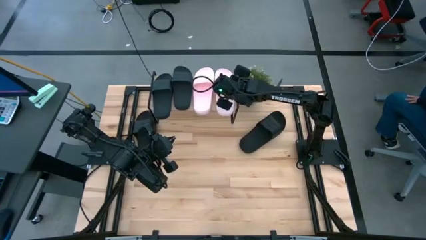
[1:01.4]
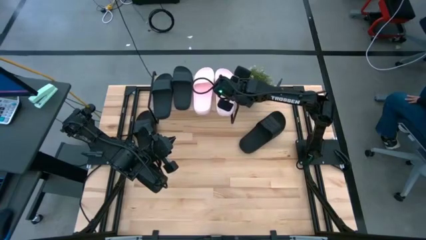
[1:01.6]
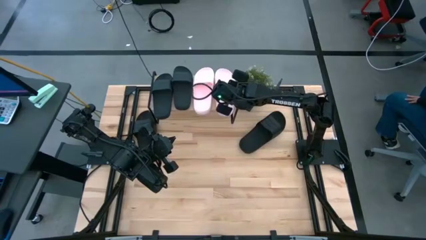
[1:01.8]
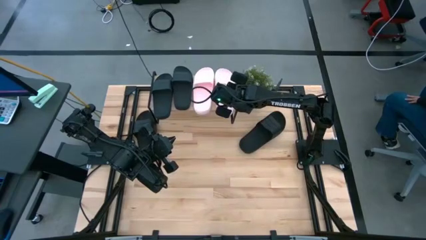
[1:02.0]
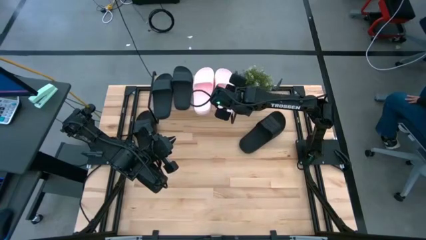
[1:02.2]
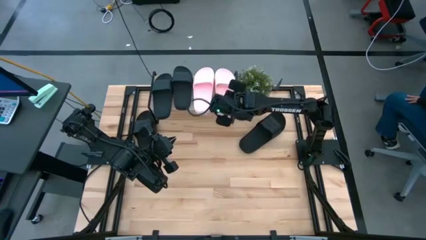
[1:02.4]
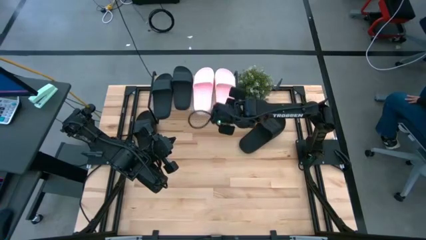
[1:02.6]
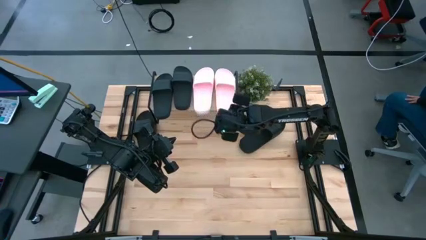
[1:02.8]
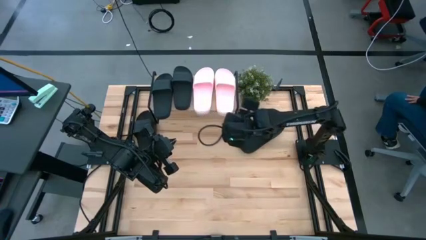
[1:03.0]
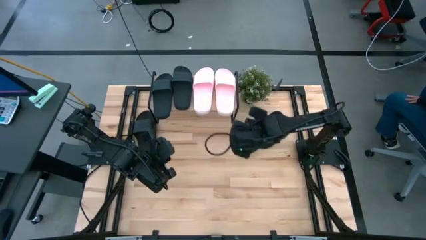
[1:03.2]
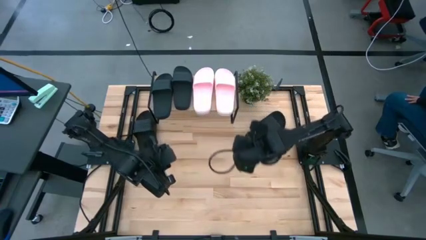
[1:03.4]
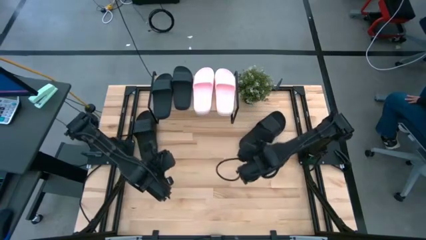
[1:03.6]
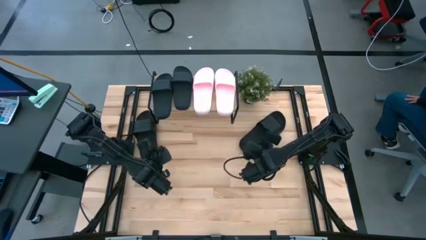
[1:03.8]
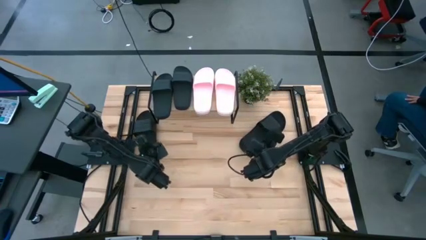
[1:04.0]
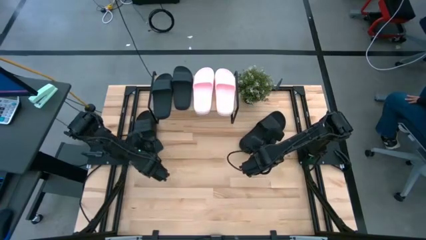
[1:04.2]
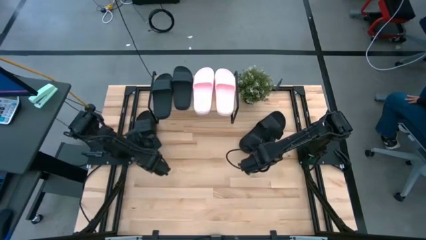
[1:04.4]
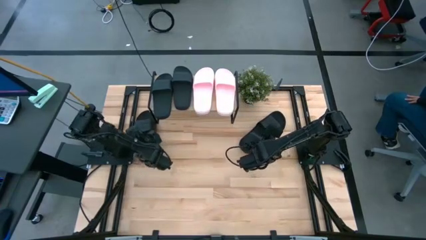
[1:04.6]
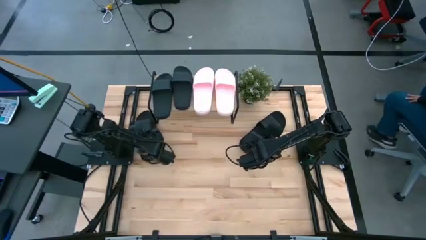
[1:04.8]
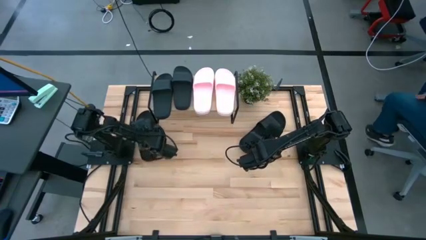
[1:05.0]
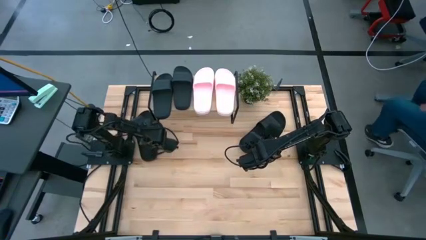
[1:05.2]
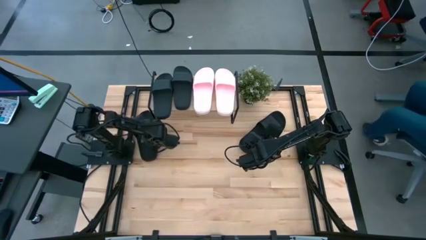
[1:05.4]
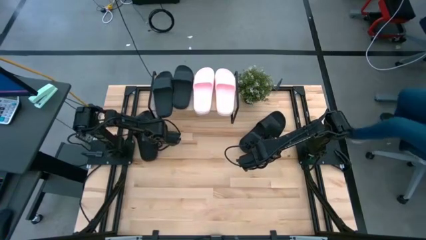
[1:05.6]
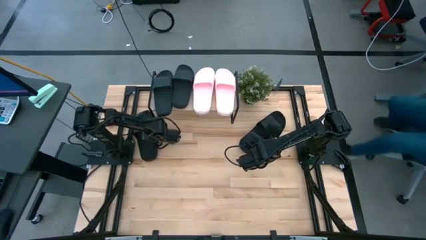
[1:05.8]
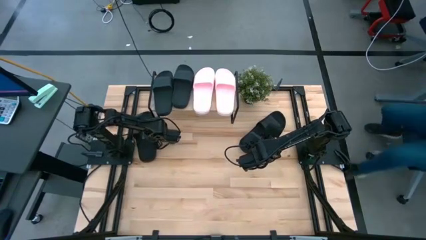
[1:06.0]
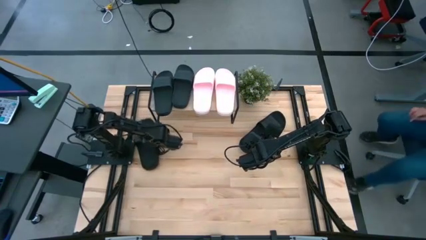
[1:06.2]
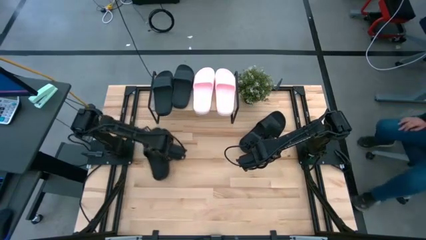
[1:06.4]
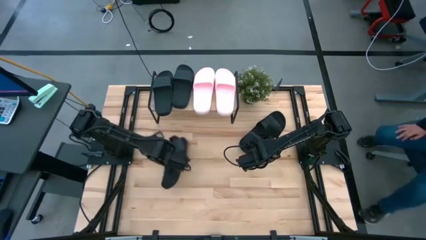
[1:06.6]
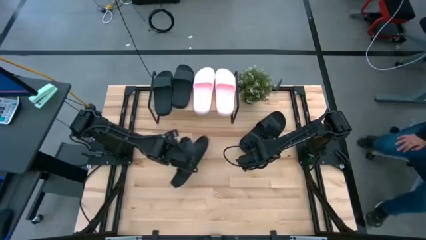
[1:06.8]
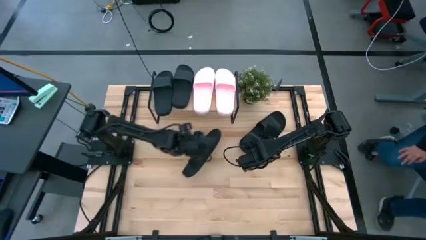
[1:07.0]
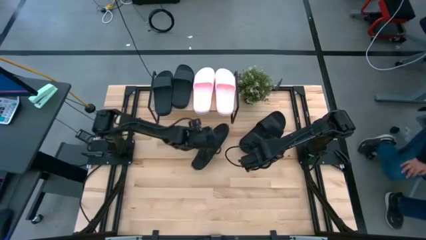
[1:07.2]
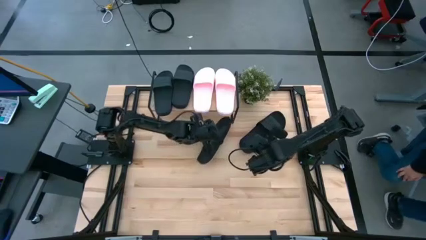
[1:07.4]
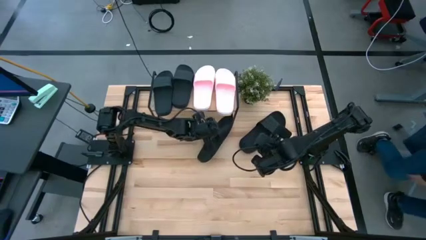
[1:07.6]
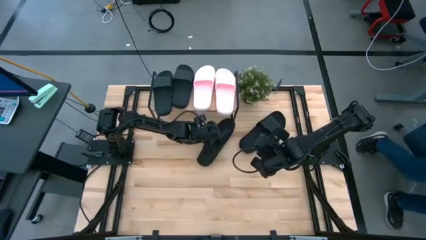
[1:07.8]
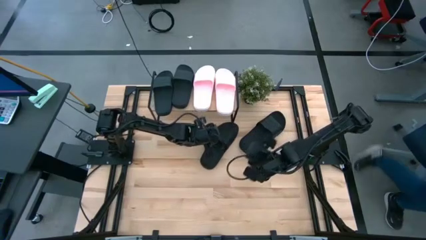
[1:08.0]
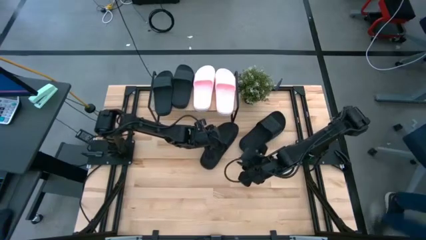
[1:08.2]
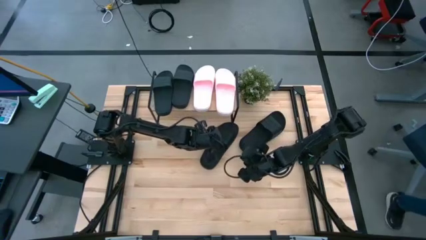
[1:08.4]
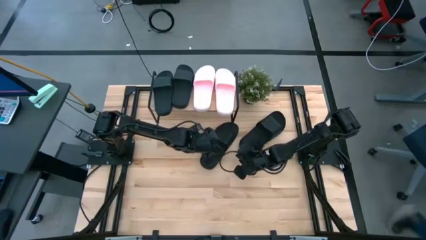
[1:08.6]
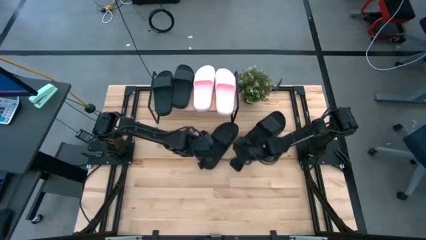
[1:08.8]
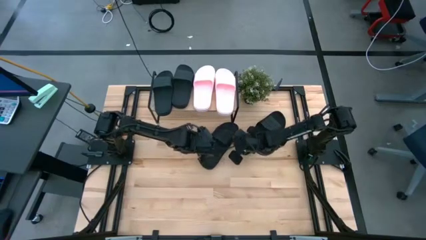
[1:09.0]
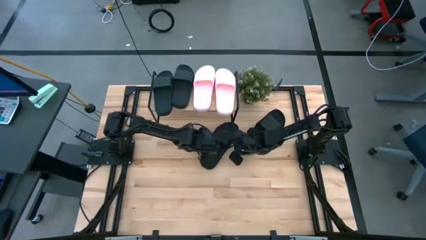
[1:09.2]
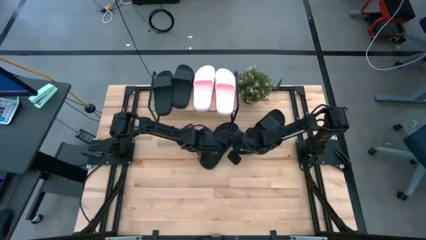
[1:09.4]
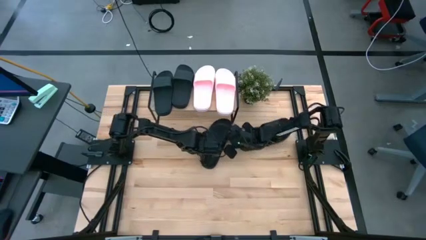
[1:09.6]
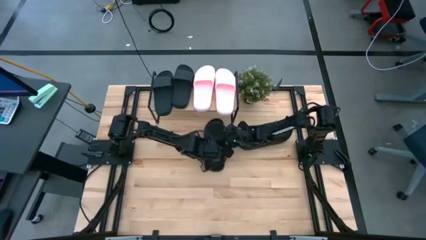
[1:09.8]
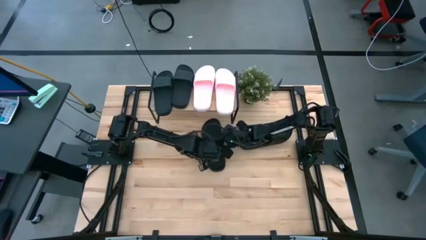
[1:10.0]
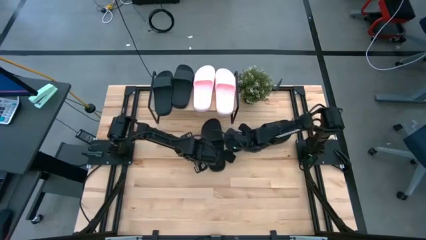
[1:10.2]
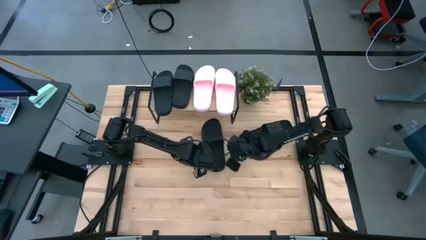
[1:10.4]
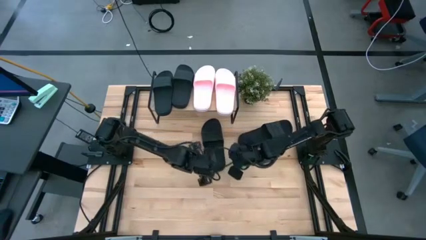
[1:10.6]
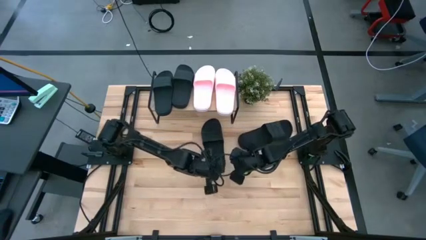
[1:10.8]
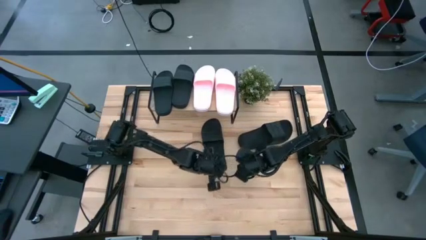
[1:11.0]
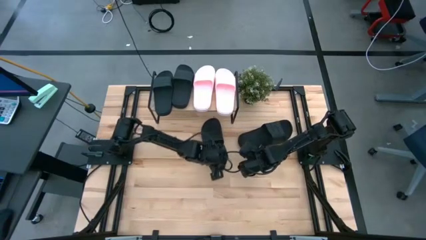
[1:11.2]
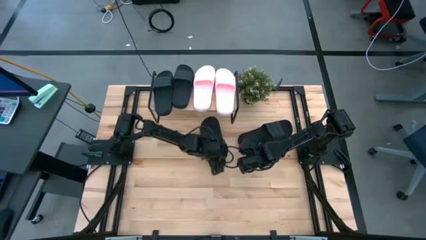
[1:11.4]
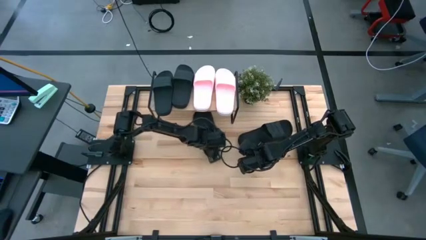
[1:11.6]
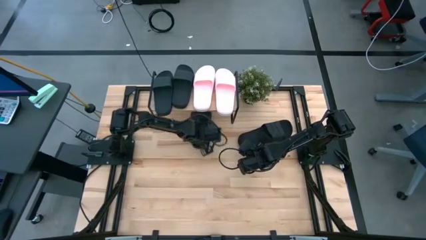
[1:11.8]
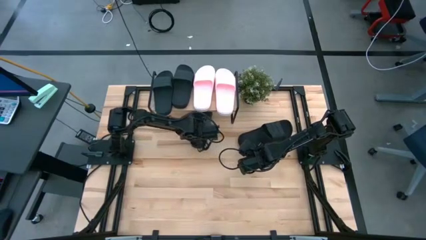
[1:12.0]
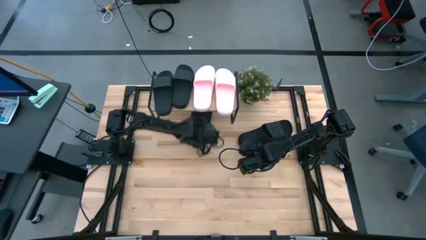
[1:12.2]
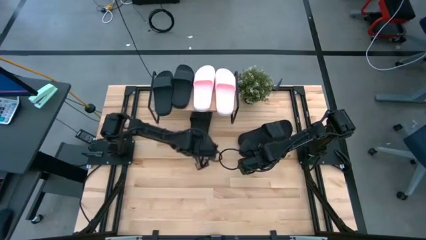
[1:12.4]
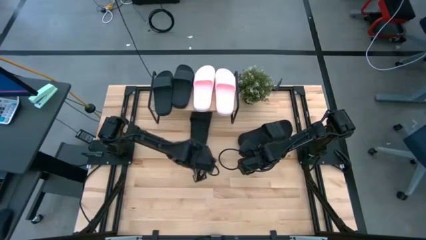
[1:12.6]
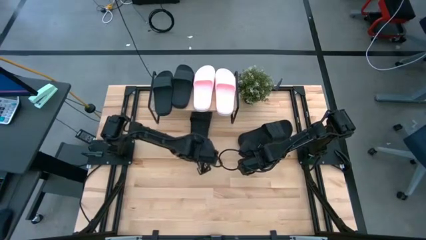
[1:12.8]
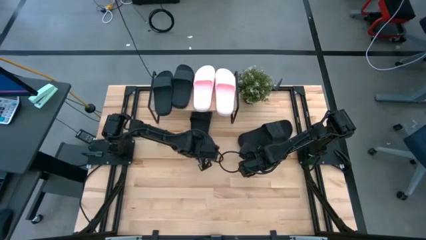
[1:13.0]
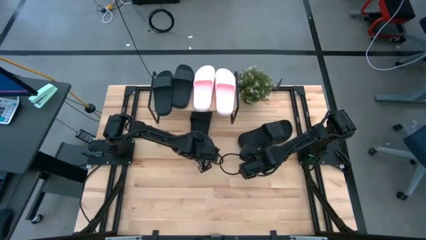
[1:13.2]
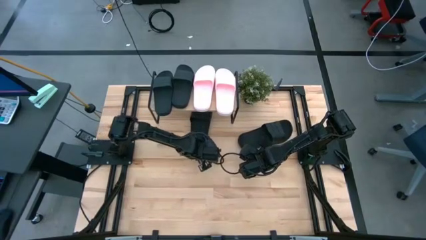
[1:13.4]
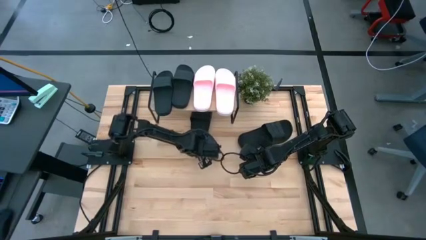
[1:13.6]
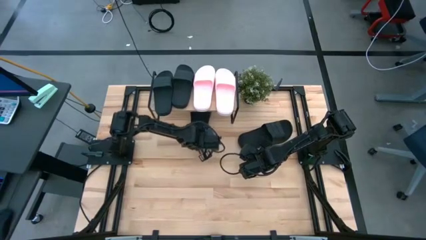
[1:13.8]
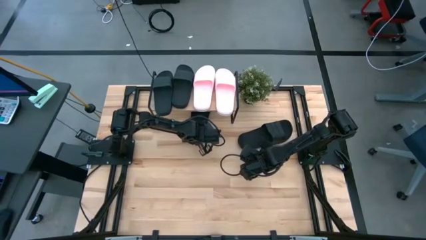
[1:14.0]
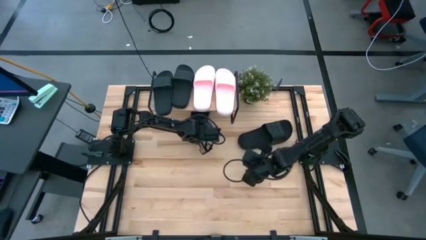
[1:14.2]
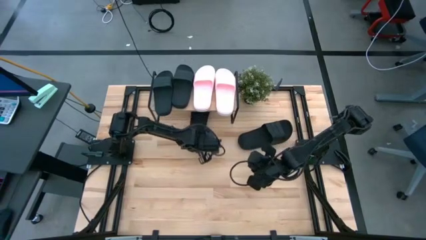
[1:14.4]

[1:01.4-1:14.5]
Task: Pick and place slides into the shelf
Put the left black slipper under the shelf

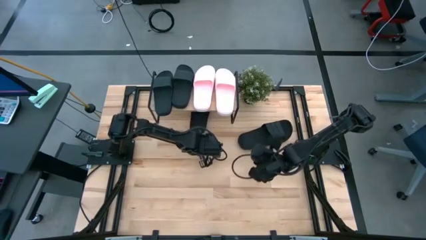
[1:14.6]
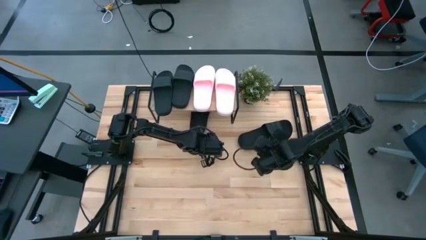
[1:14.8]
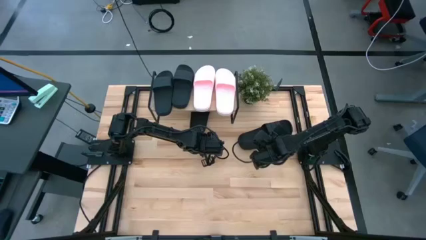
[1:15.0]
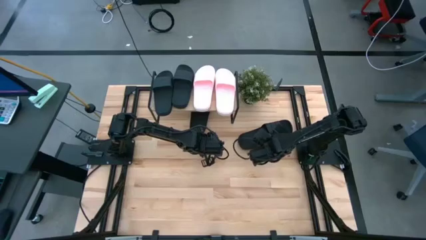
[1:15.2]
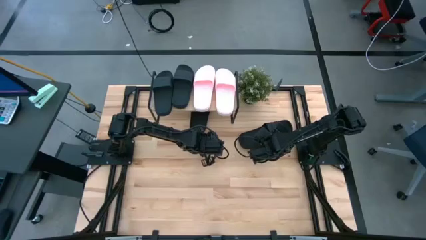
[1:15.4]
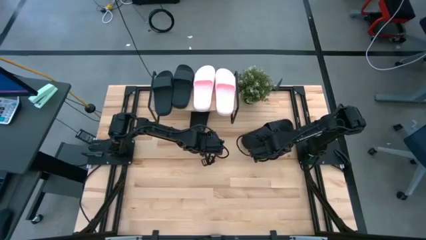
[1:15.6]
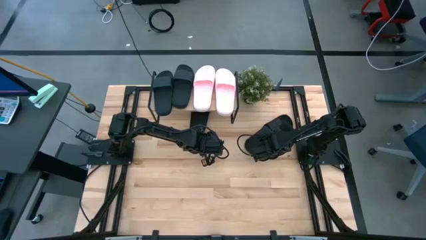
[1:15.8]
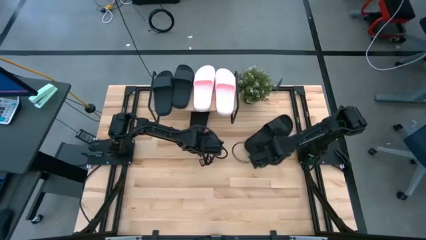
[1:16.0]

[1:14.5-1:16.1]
Put the black slipper under the shelf

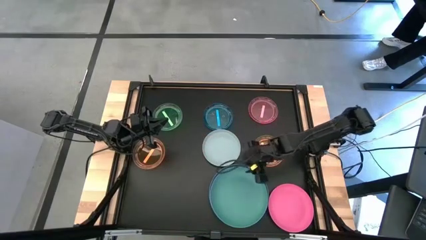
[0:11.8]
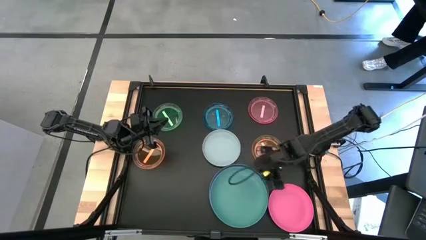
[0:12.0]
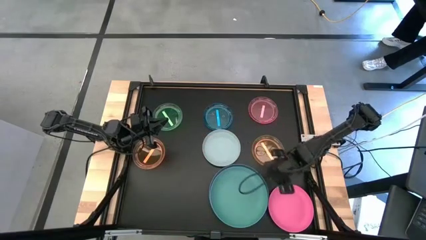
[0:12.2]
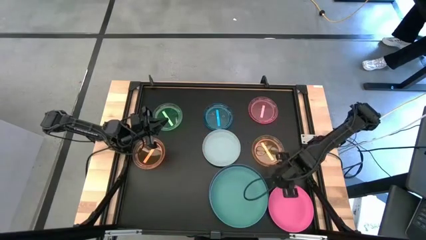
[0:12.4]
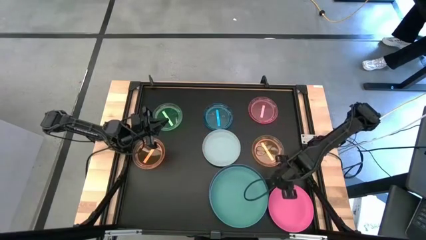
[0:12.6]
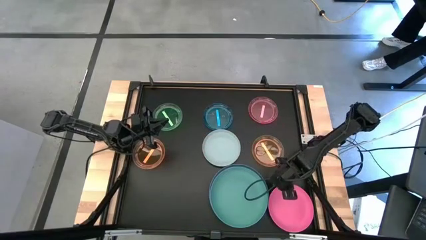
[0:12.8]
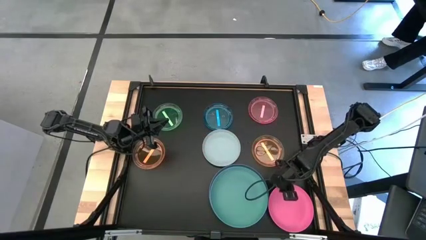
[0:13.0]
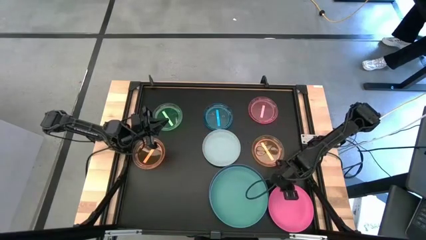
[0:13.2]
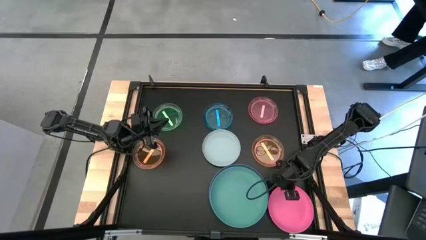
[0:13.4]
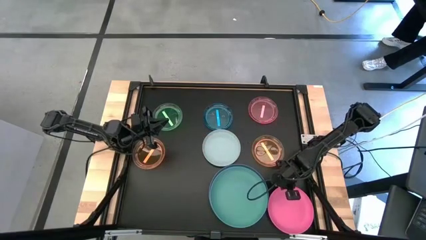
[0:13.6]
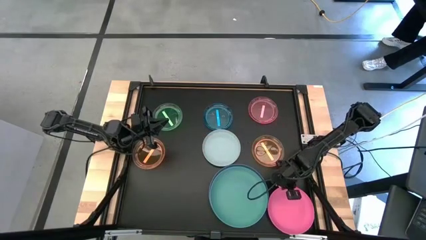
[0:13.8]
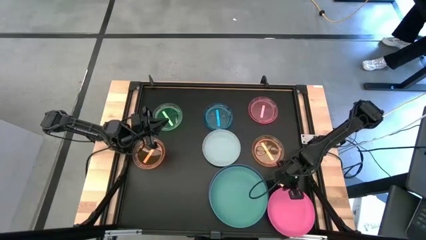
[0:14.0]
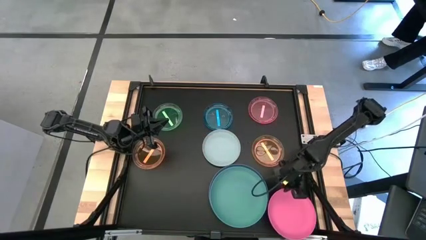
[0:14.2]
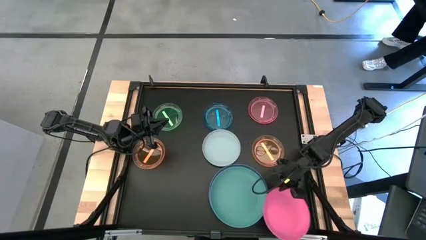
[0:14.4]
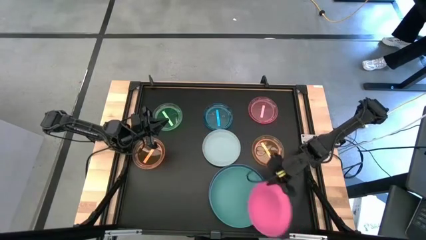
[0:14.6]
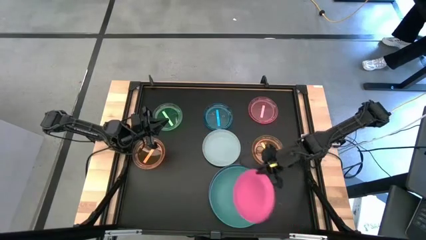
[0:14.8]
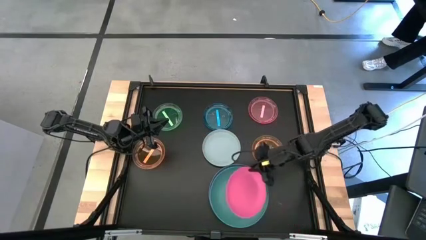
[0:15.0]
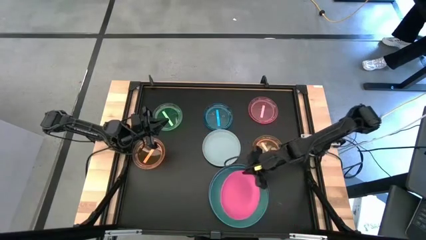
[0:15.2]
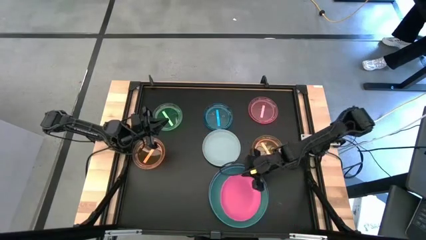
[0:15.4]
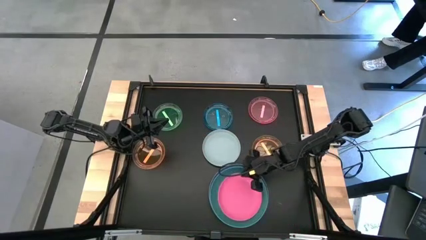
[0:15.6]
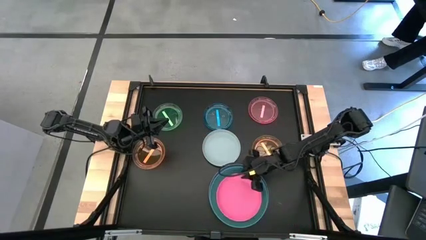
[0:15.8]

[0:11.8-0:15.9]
Task: Stack plastic plates
Stack the pink plate on top of the green plate
